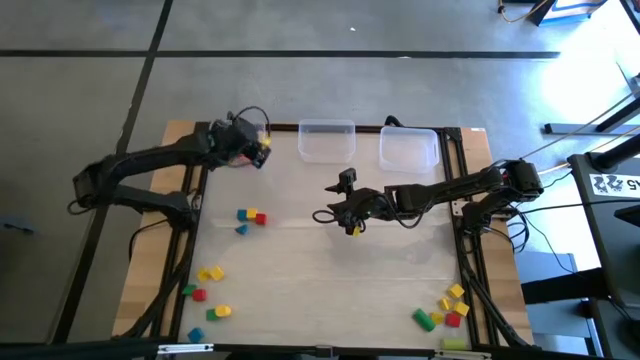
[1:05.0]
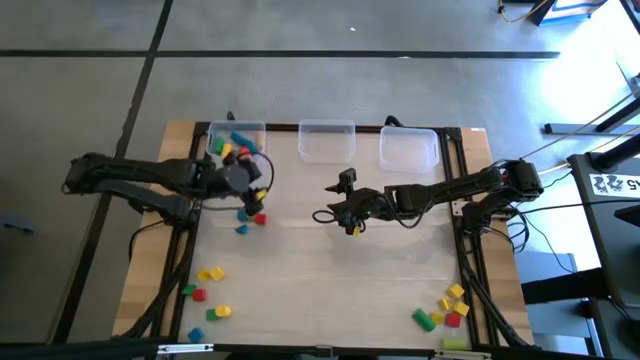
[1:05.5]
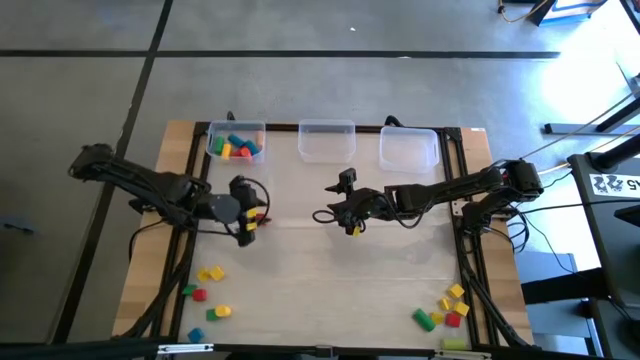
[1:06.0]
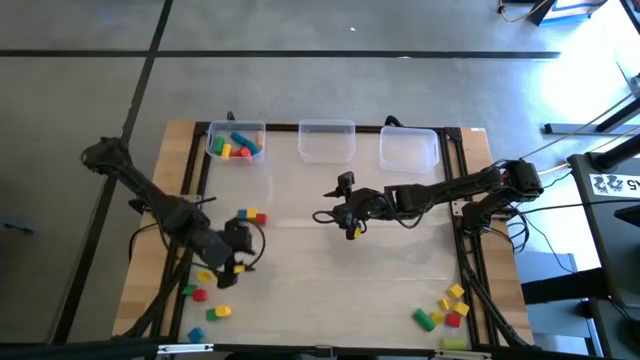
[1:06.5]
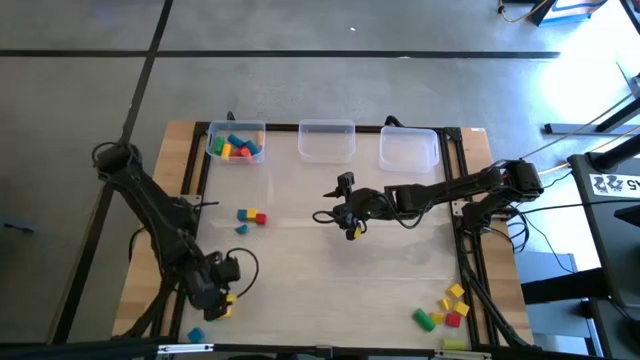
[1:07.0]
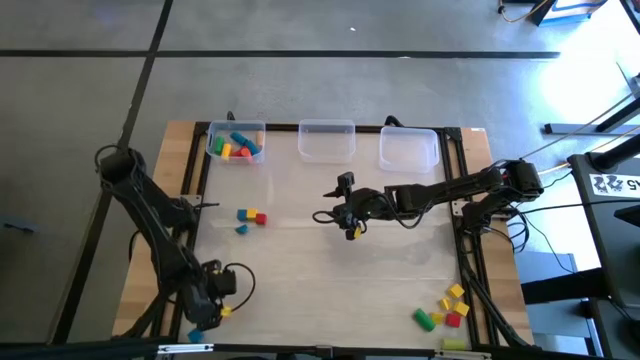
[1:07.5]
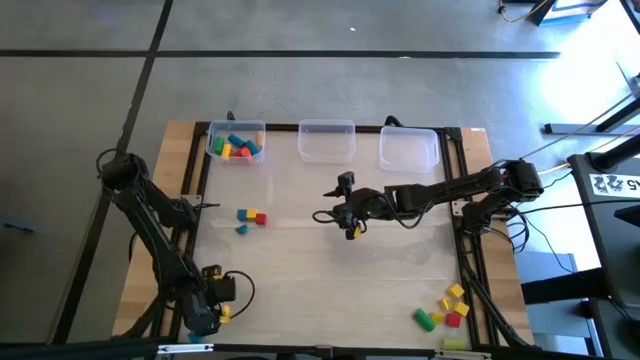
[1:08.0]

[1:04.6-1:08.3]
Task: Sort blocks by size
Put the cylindrical yellow block into the left transparent bin

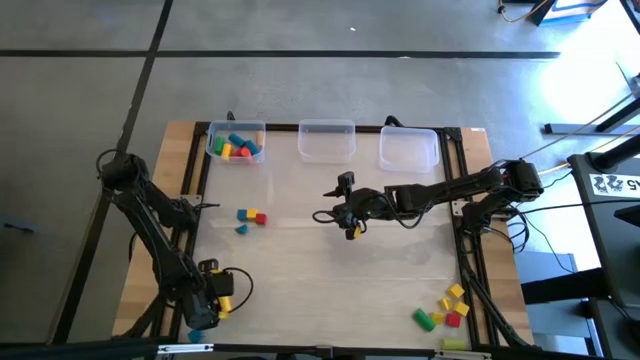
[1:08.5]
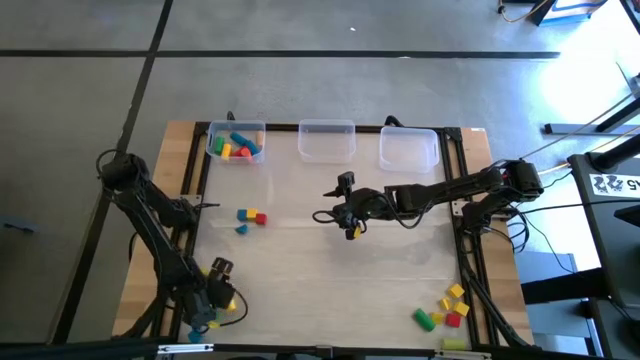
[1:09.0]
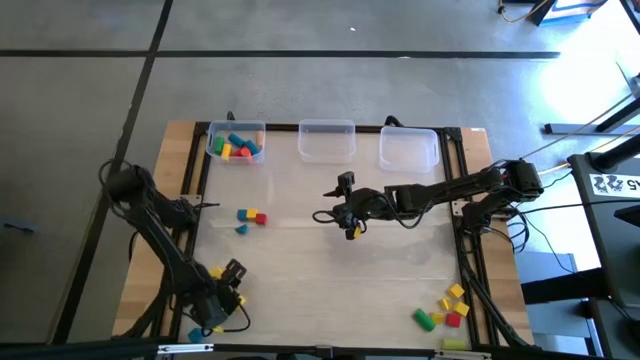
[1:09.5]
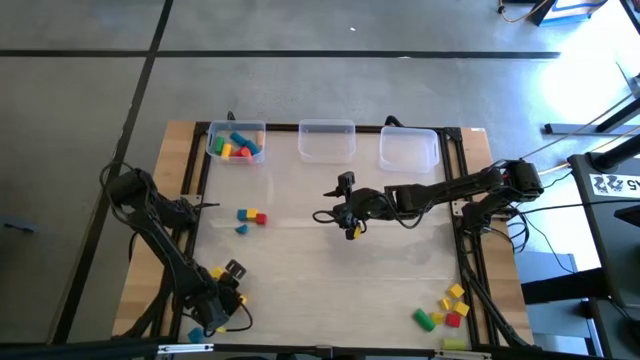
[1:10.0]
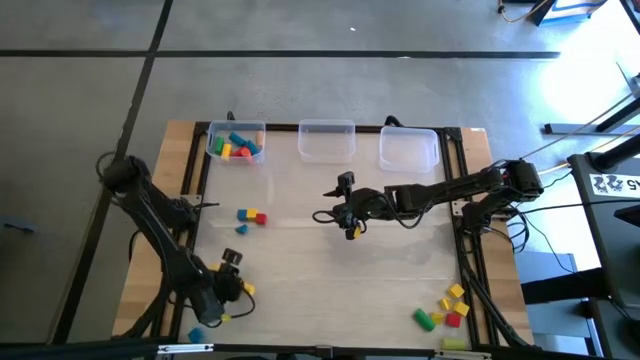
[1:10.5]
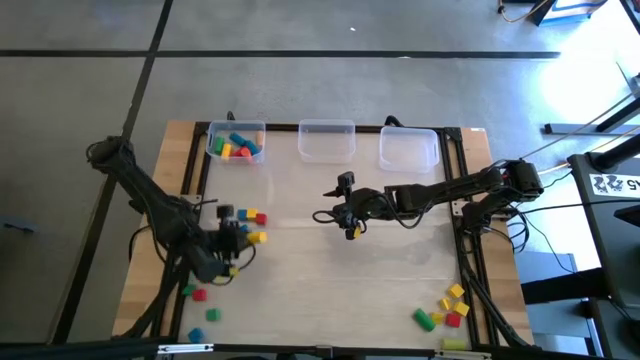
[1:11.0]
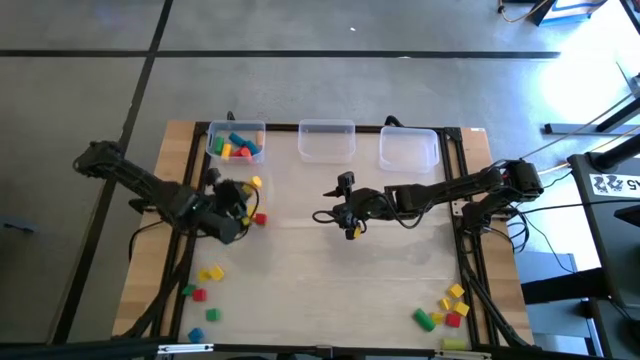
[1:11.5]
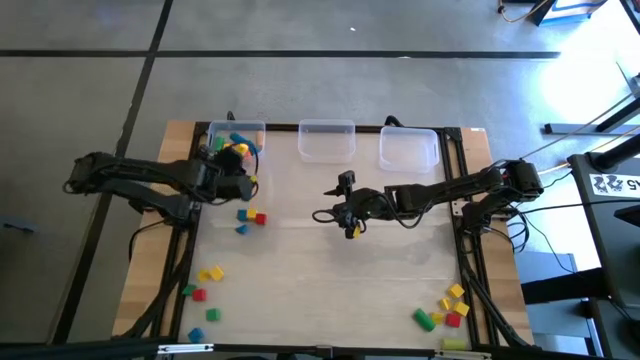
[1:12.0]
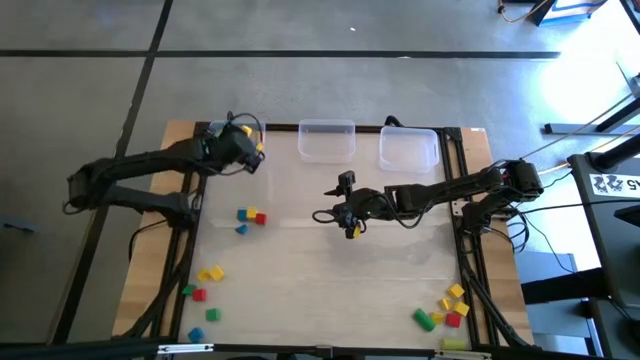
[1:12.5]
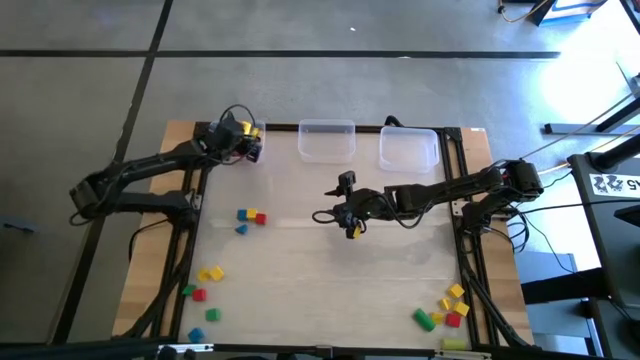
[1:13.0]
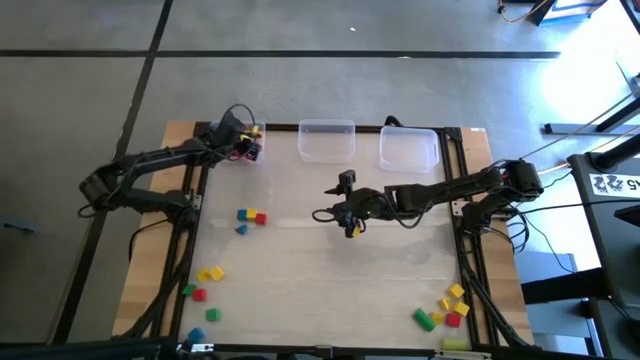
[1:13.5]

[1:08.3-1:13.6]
Put the cylindrical yellow block into the left transparent bin

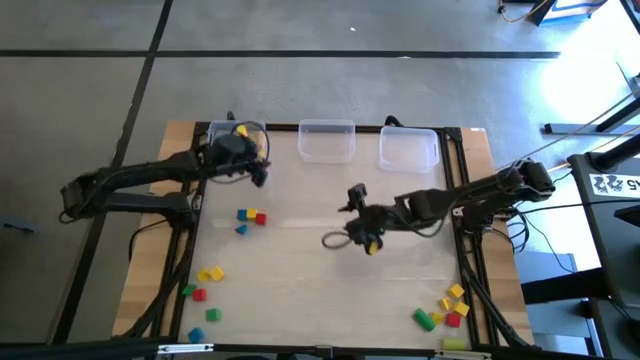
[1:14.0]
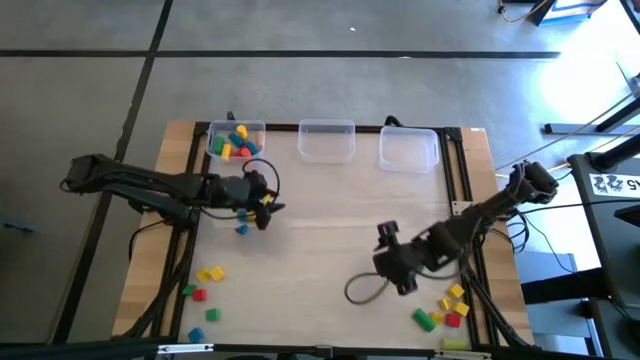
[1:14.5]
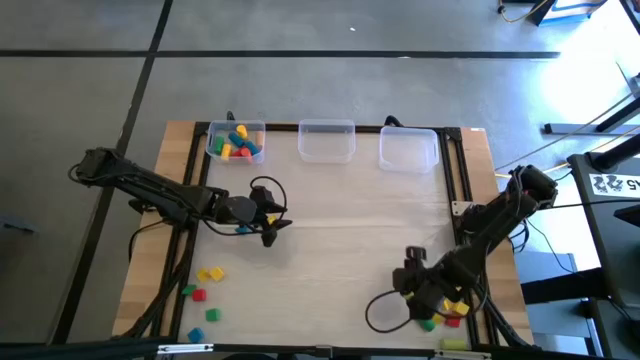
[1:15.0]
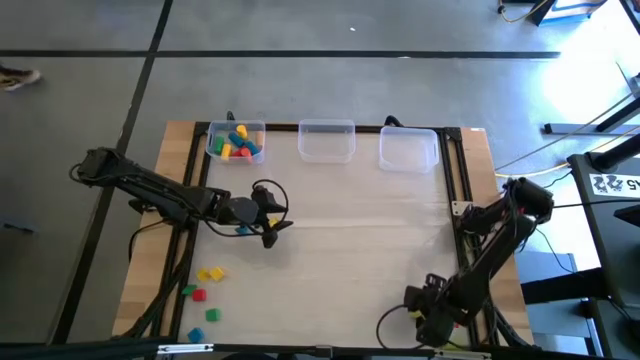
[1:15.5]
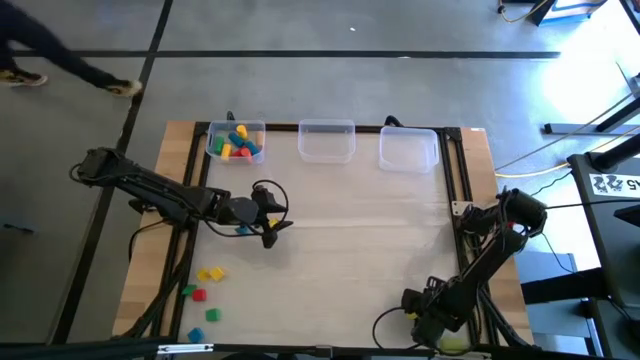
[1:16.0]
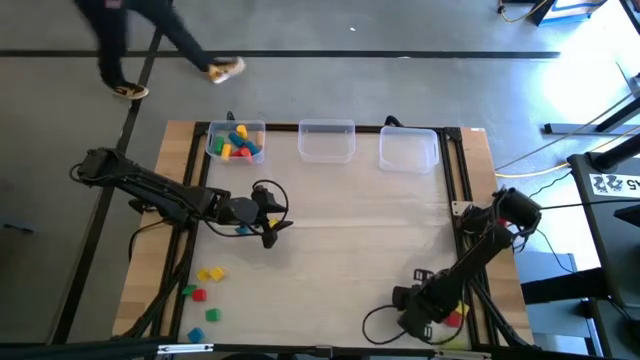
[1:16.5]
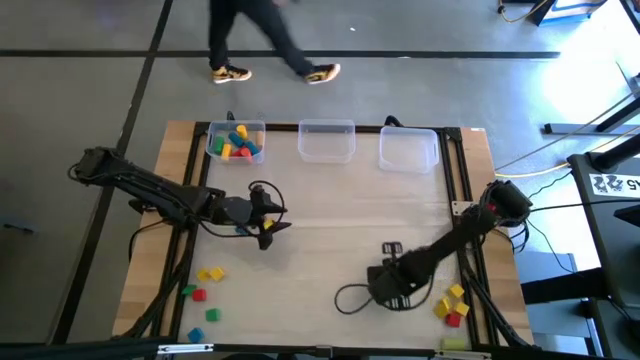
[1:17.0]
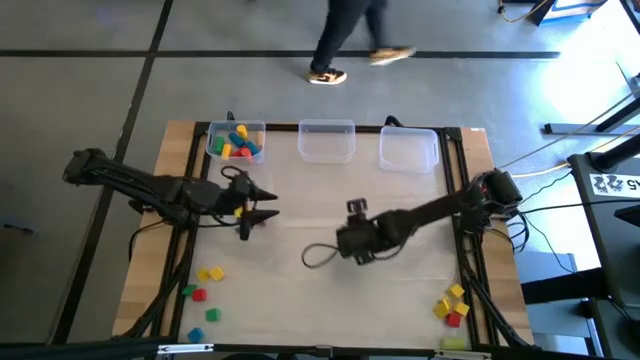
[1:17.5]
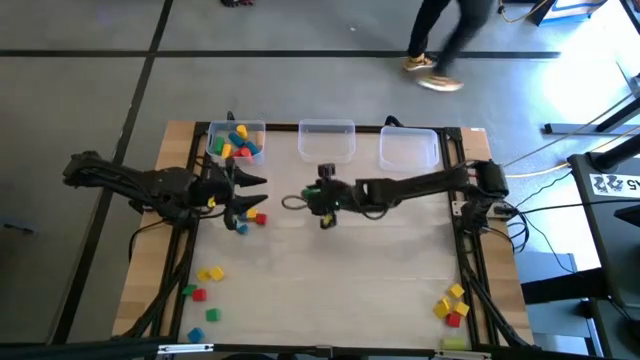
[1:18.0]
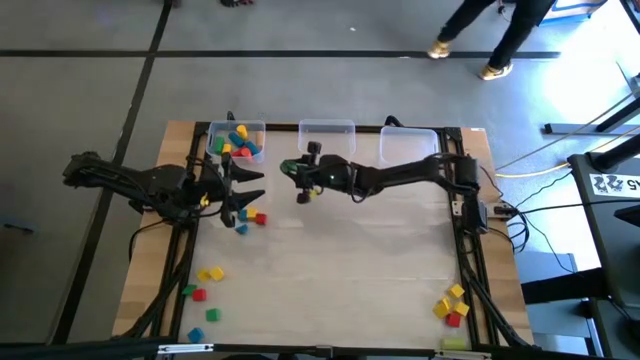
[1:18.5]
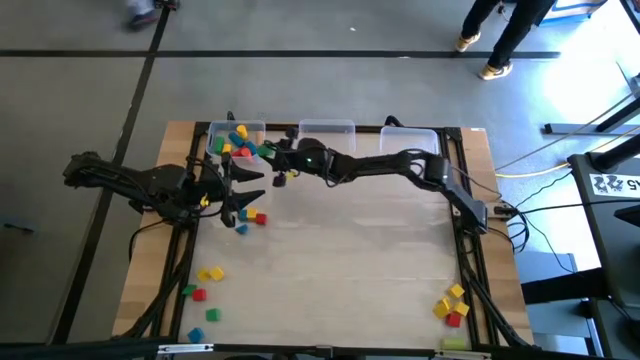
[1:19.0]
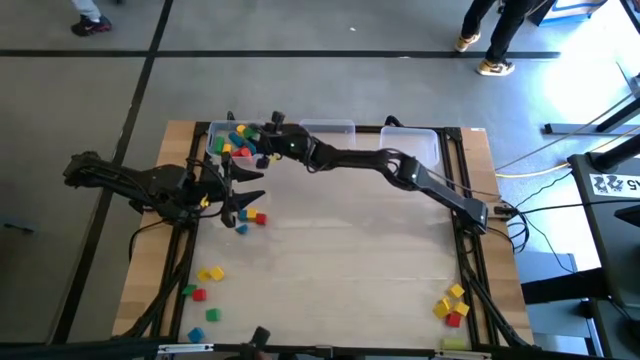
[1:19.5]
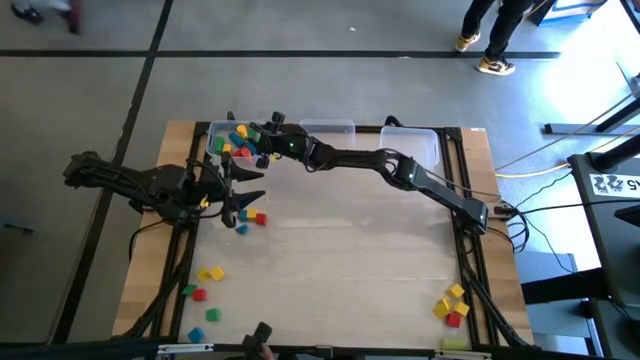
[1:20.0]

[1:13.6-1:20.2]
Put the cylindrical green block into the left transparent bin

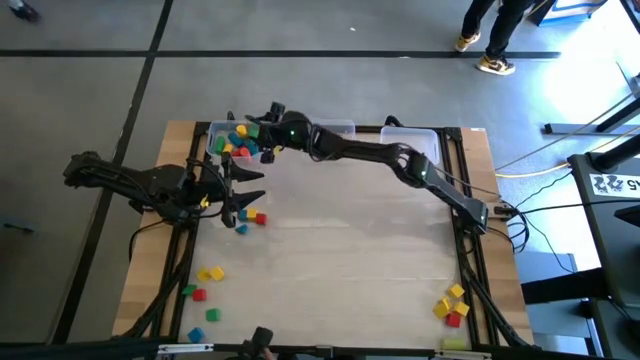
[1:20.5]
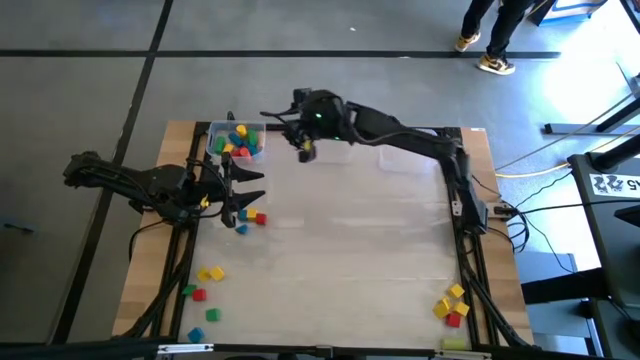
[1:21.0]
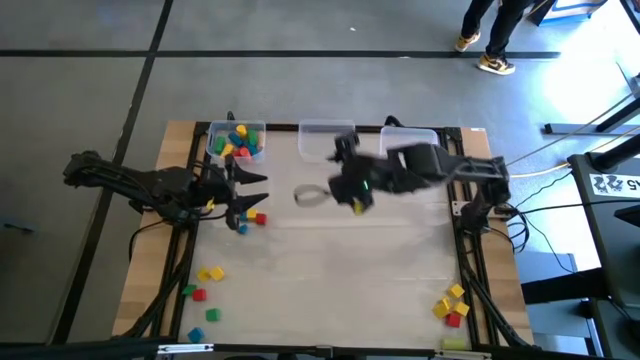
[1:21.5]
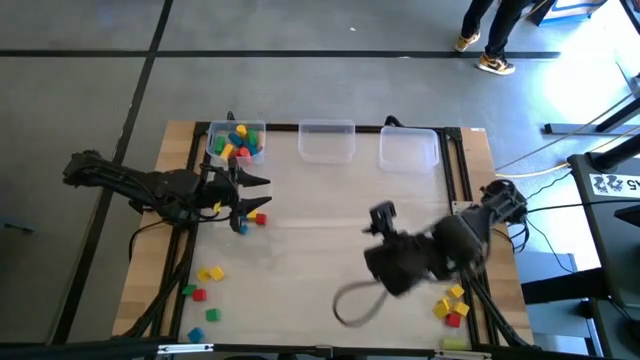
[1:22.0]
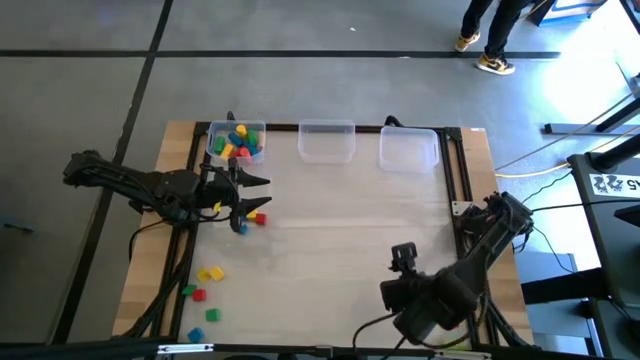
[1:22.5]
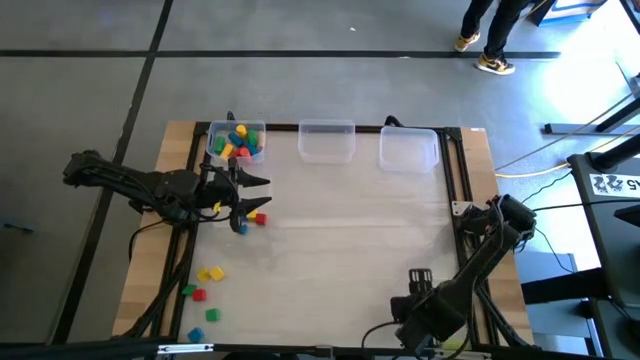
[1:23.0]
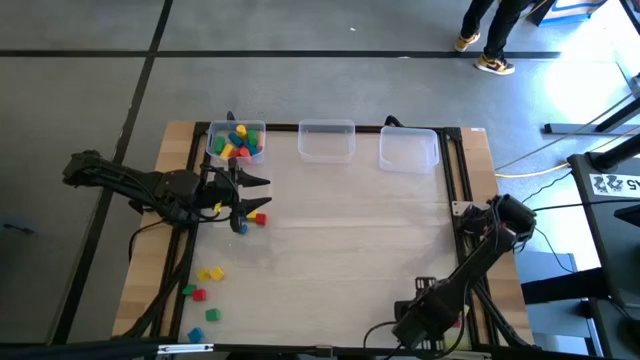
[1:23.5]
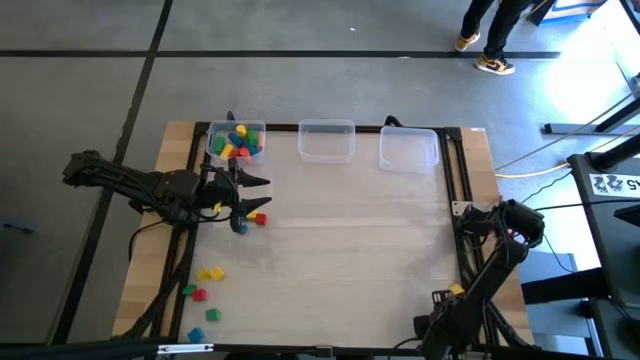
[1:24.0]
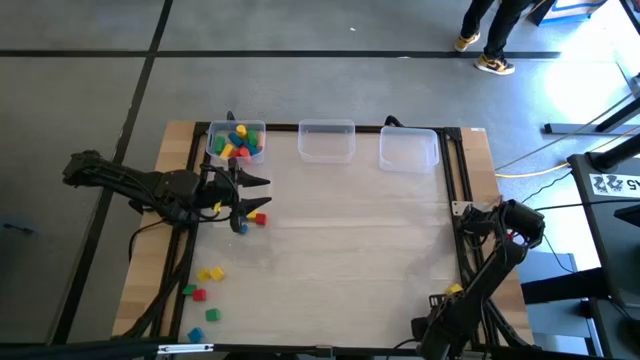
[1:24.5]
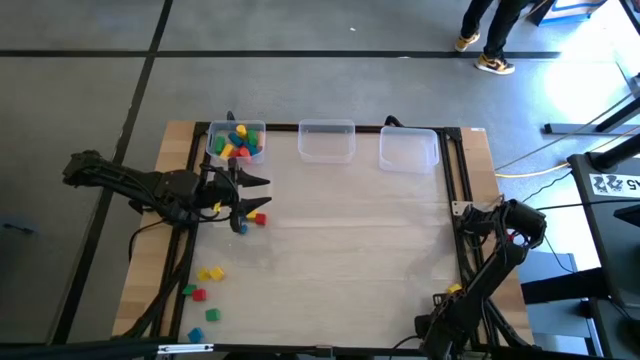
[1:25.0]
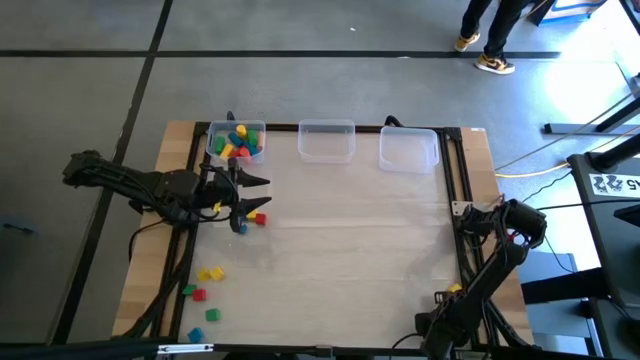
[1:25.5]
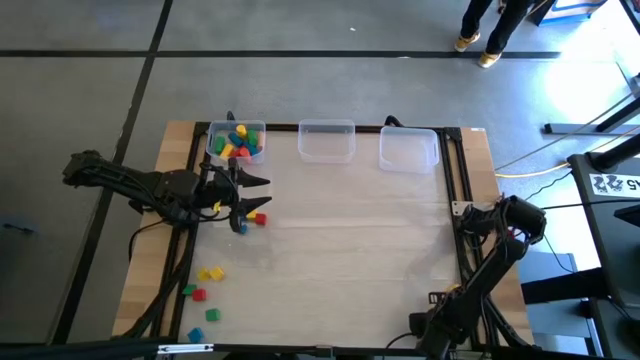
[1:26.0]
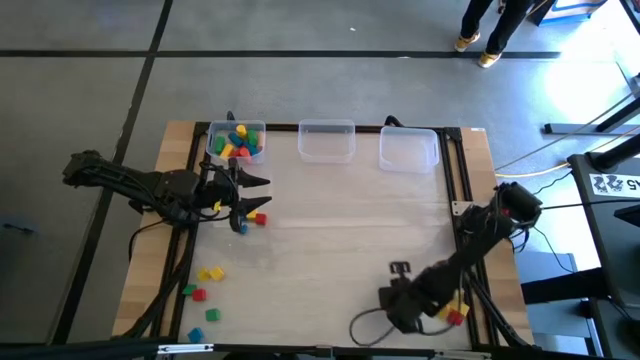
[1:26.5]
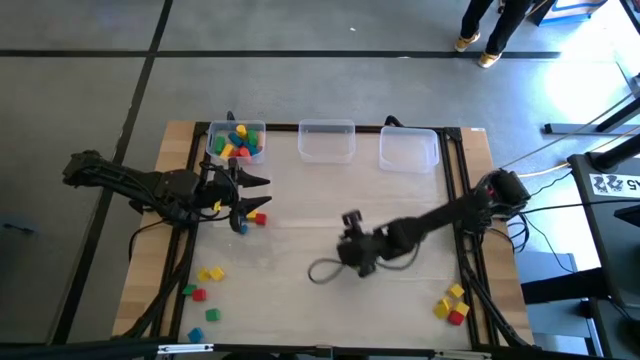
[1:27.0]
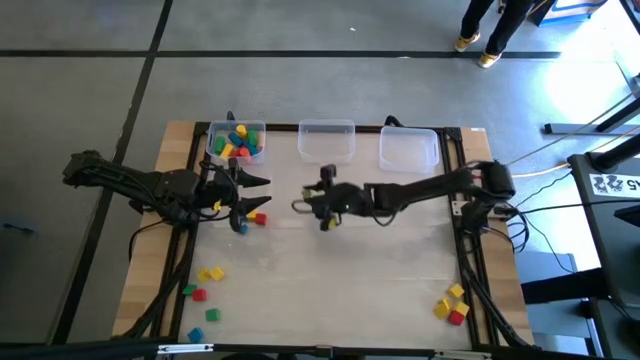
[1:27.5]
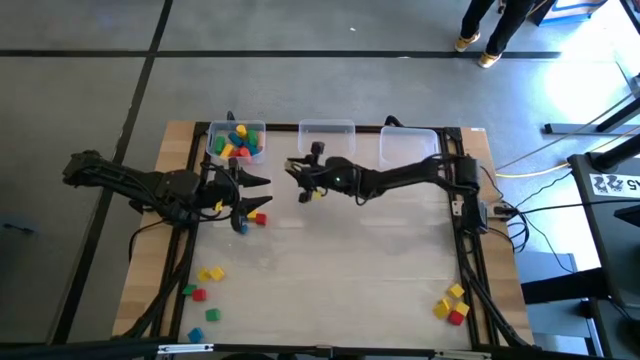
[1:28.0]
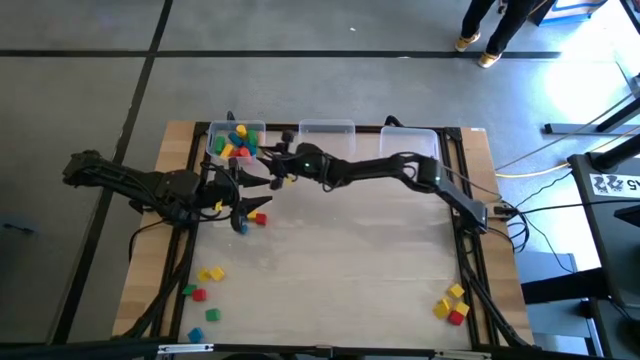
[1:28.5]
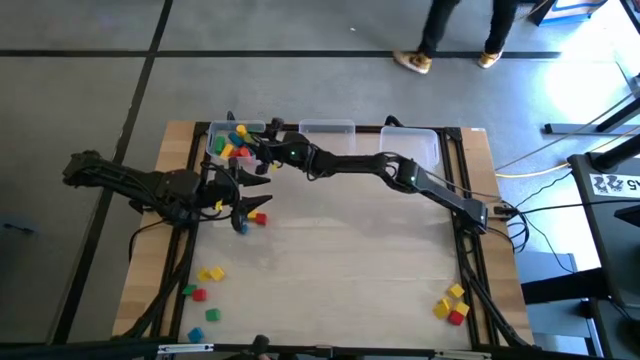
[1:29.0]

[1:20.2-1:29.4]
Put the cylindrical light green block into the left transparent bin
